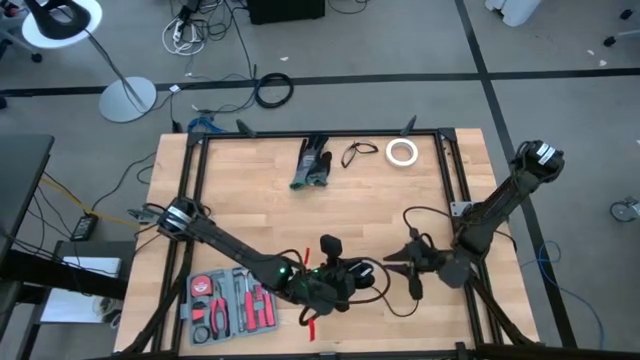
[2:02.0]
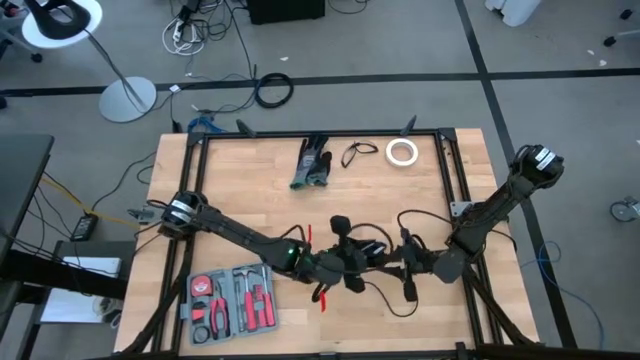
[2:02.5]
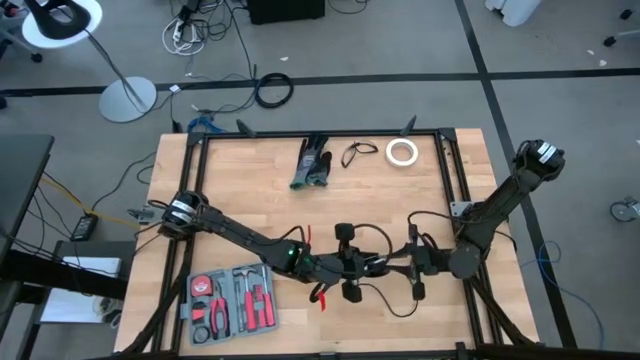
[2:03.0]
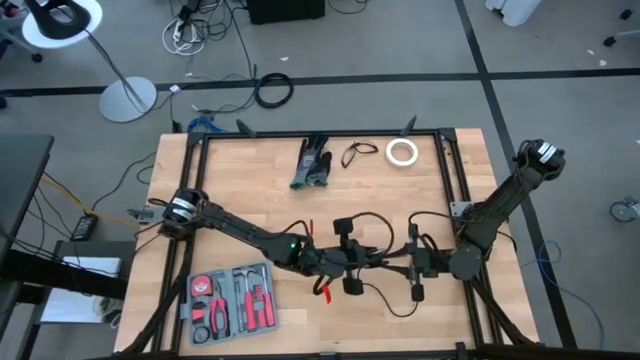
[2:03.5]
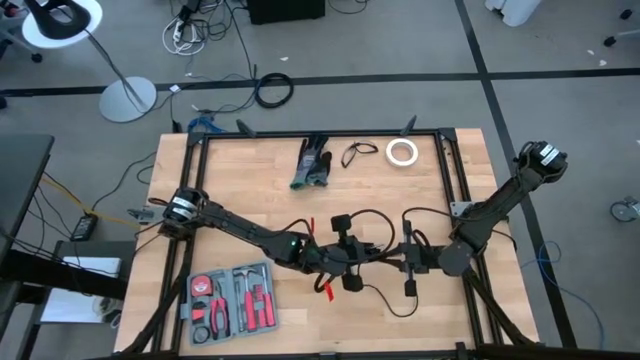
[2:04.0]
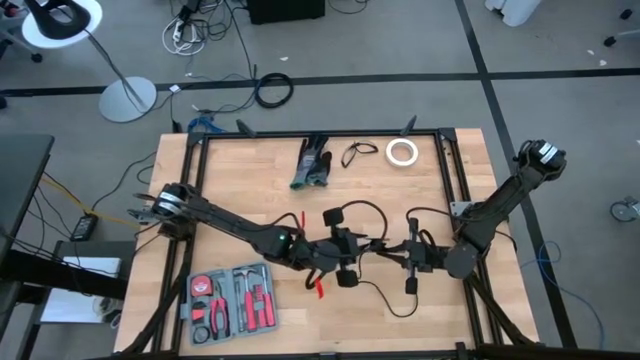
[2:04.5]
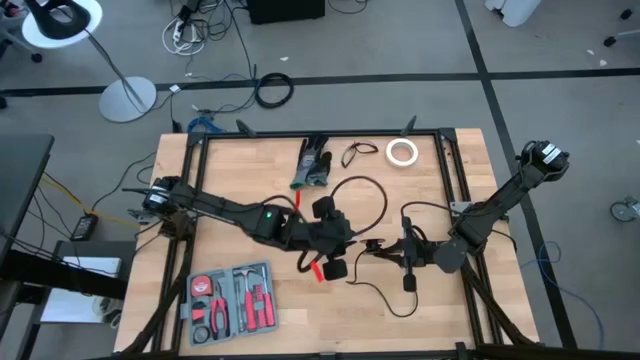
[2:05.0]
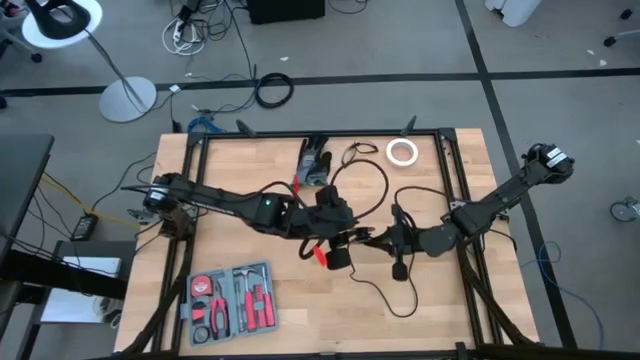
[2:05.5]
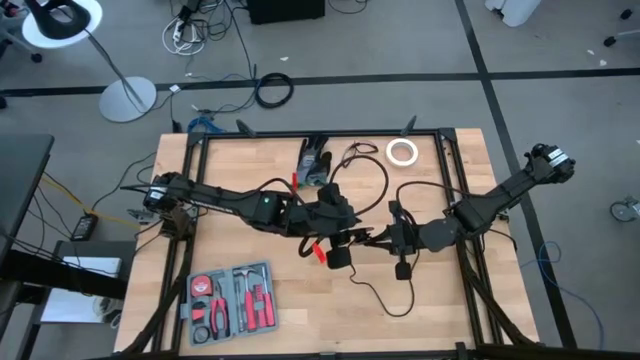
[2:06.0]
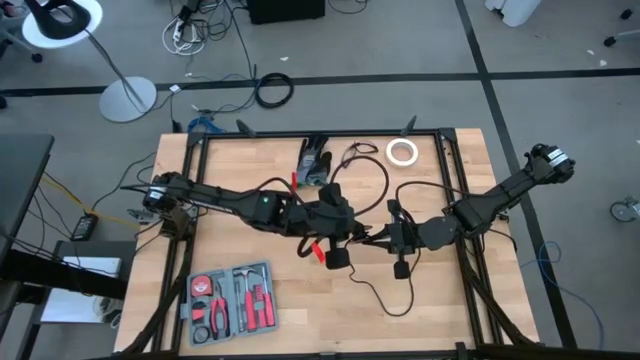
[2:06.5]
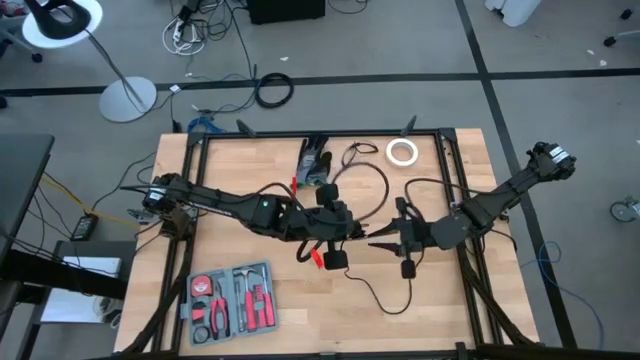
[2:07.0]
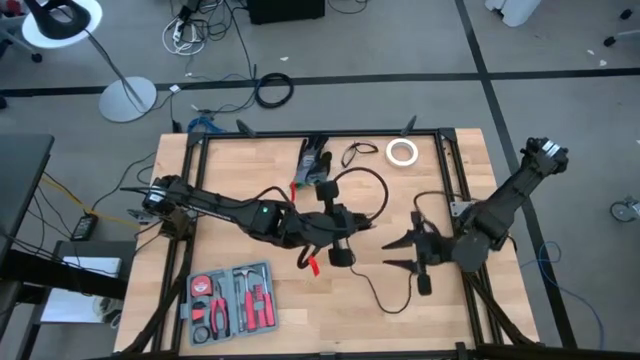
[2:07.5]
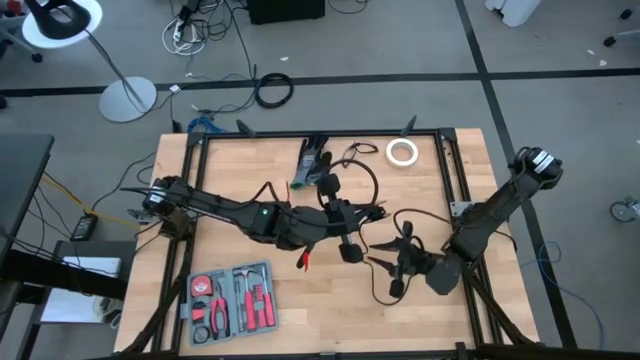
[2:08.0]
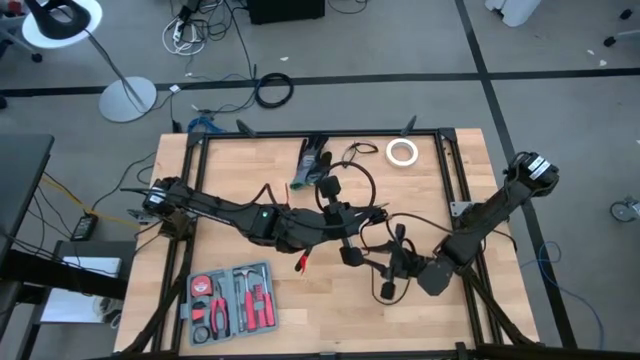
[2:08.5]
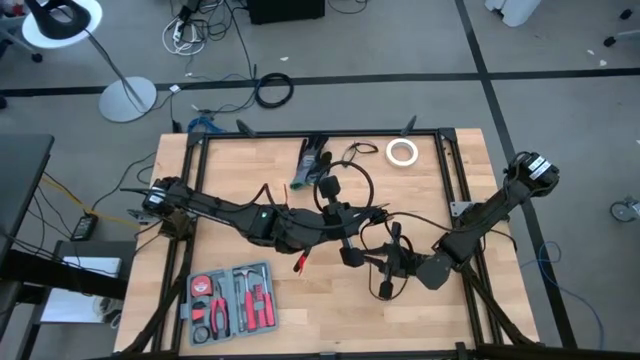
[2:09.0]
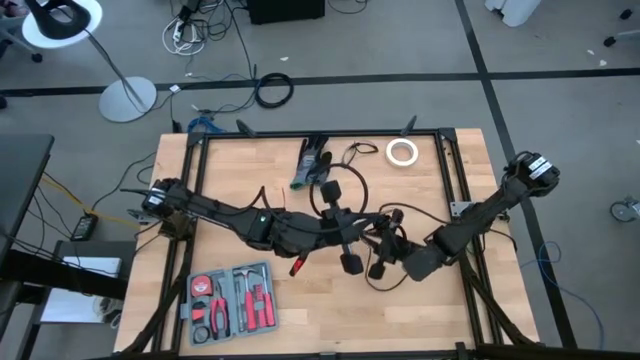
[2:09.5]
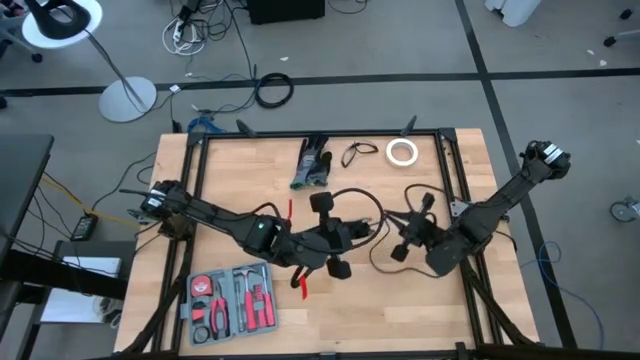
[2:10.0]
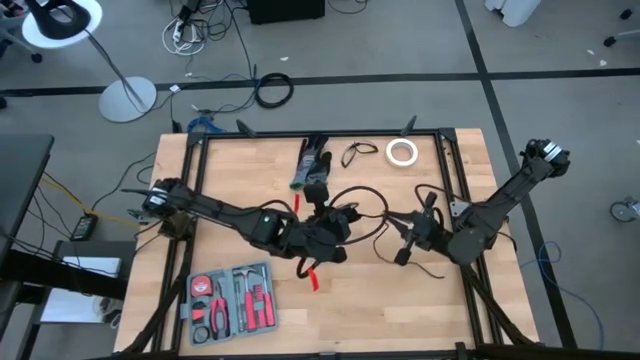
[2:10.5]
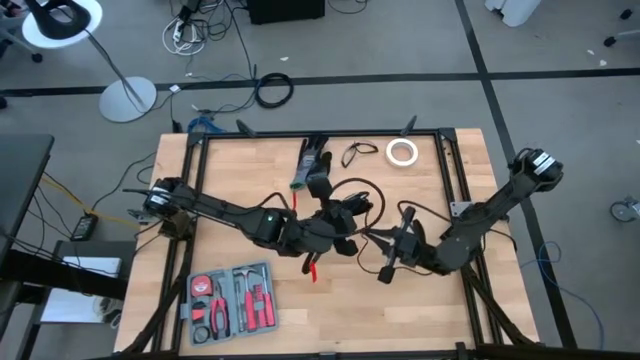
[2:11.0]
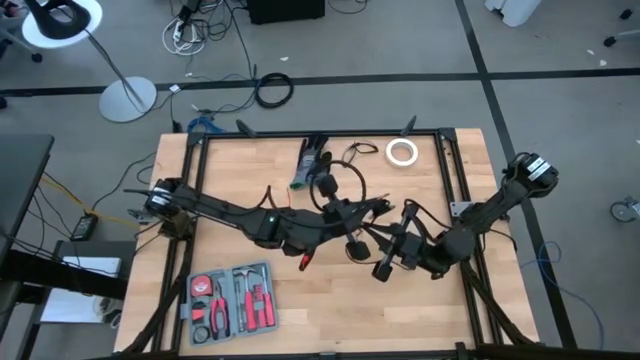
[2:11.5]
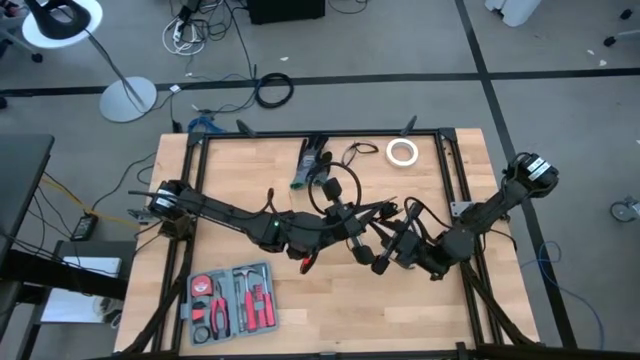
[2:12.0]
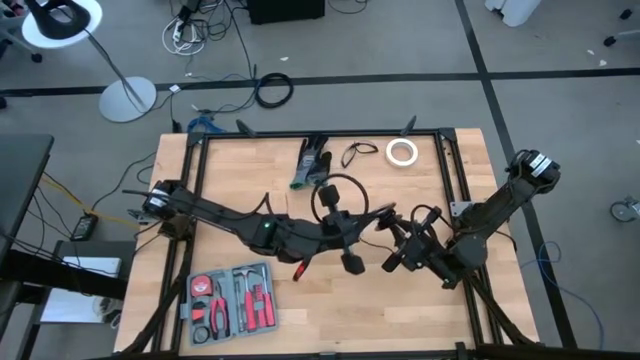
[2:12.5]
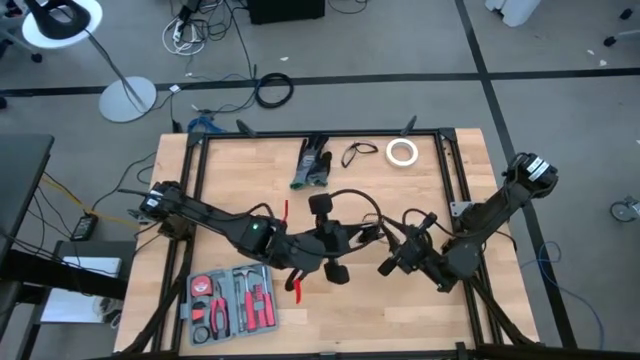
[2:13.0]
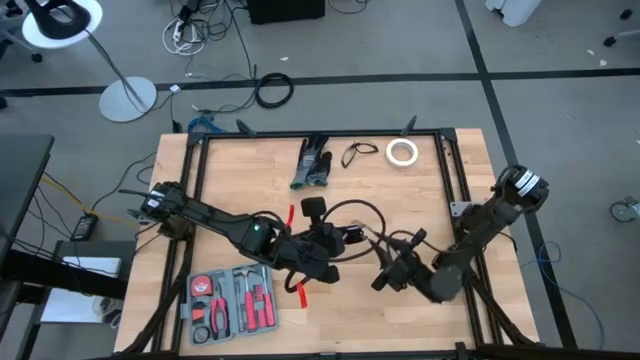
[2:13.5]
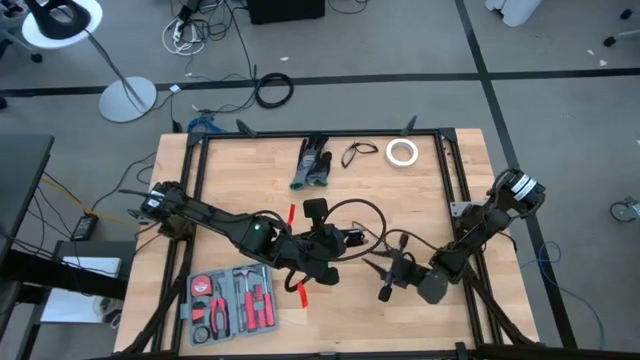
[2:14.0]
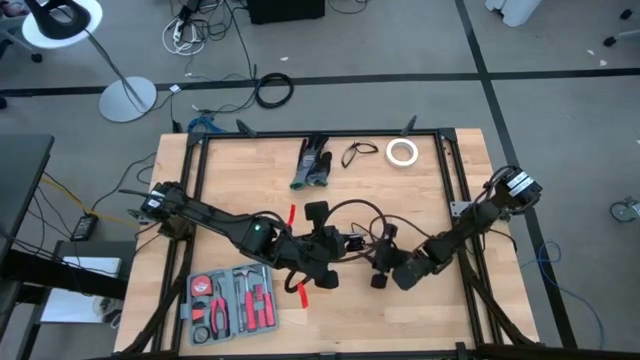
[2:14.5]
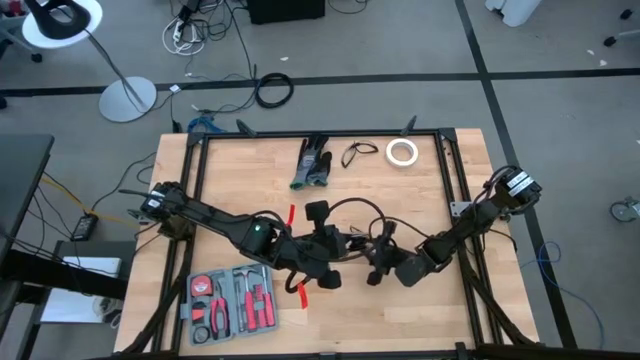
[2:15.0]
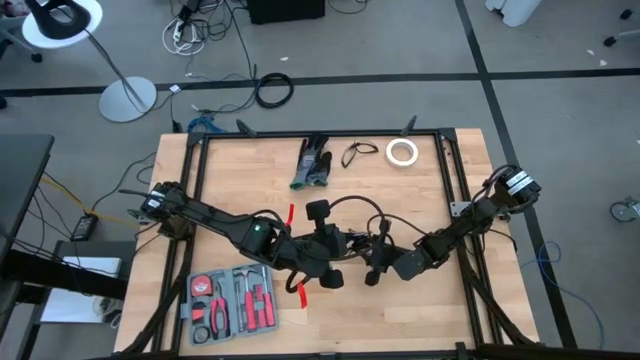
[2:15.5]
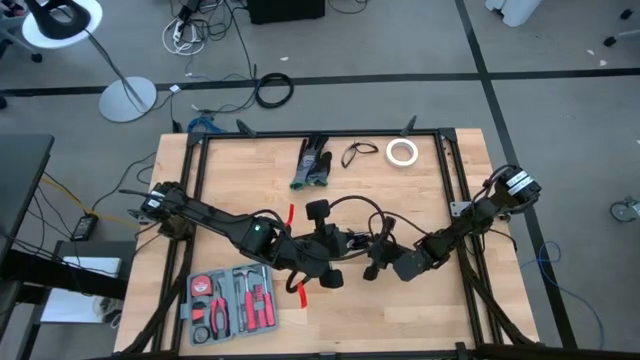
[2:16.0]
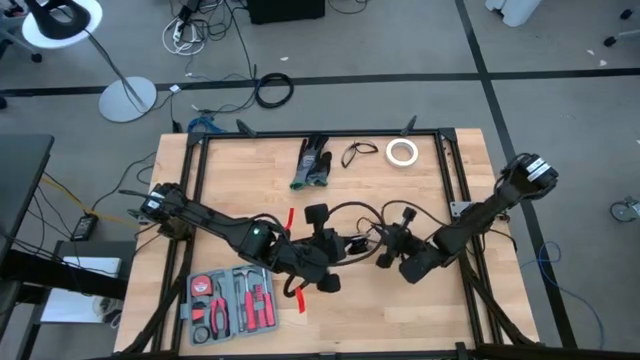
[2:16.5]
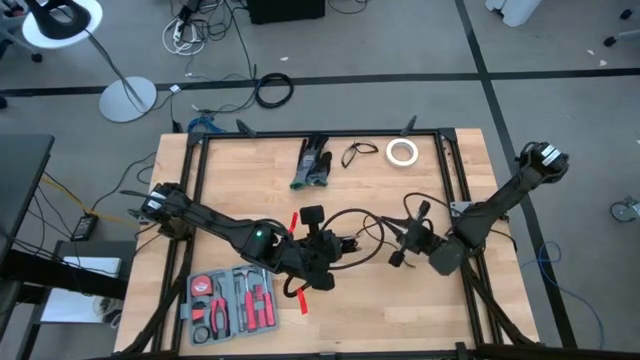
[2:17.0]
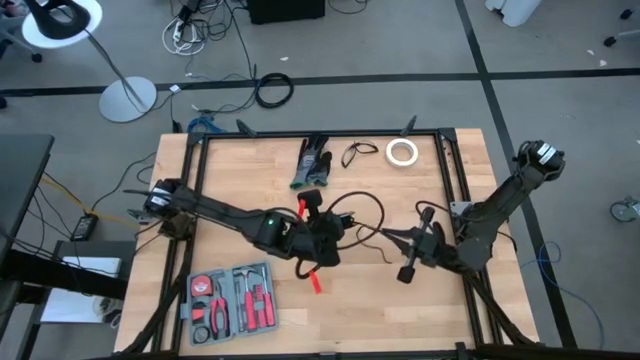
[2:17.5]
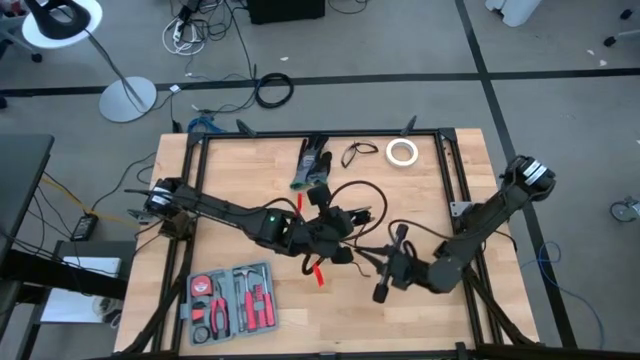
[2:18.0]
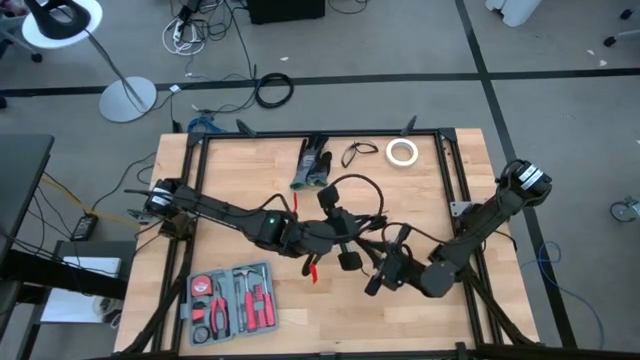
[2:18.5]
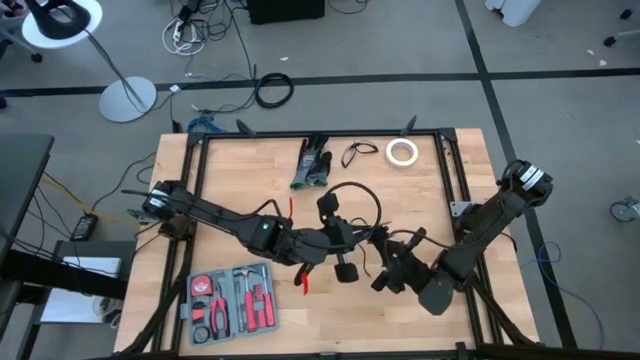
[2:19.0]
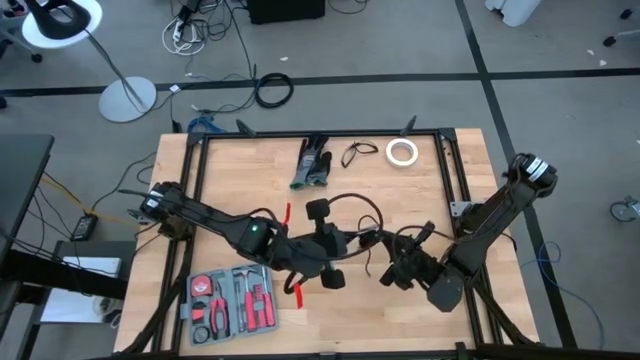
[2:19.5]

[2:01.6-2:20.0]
Task: Coil cords
Coil the black wire into a spool

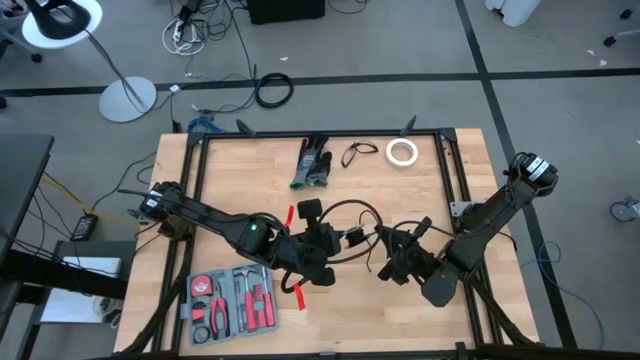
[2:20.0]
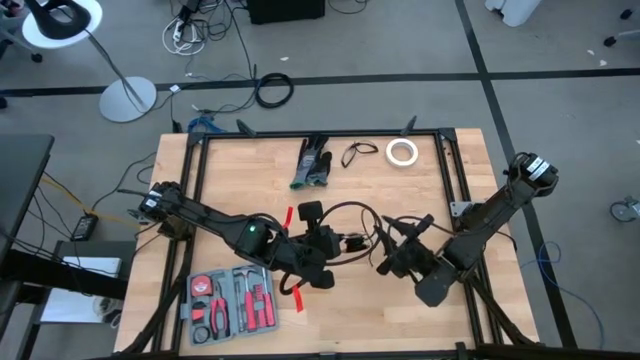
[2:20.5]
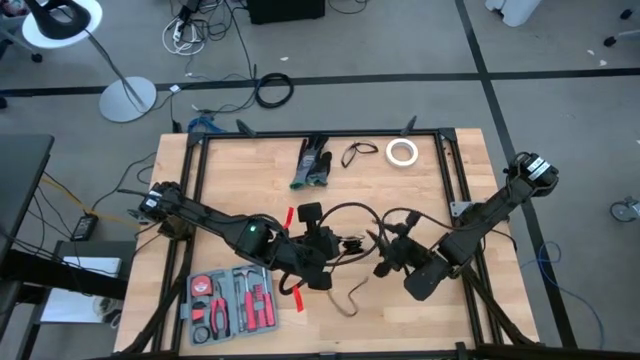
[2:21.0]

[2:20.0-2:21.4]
Coil the black wire into a spool

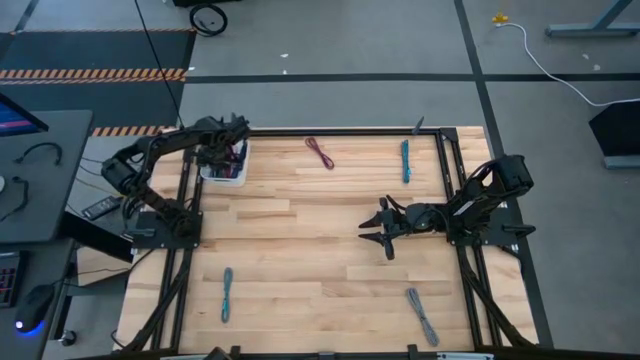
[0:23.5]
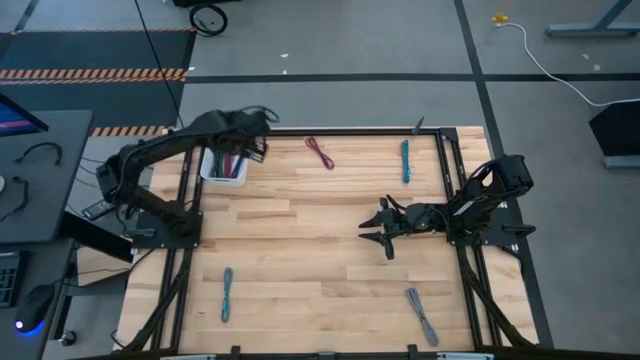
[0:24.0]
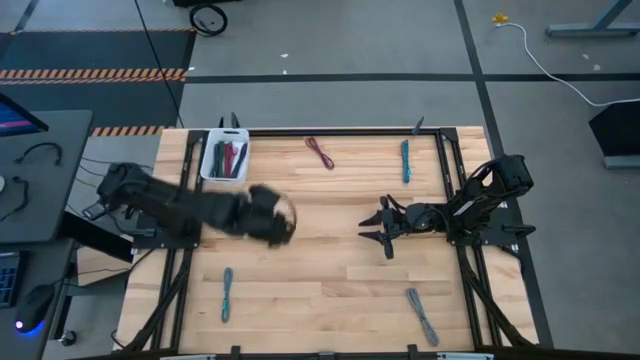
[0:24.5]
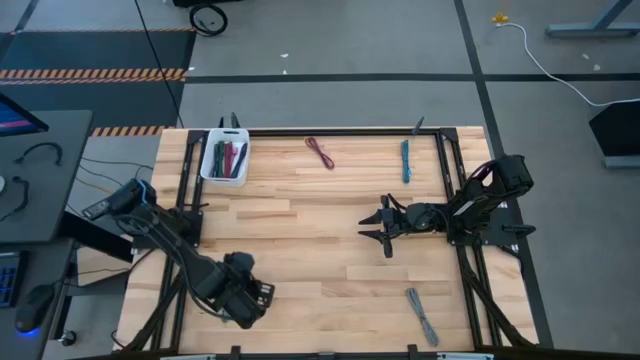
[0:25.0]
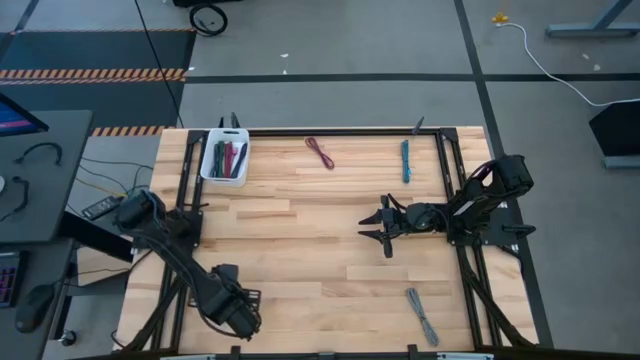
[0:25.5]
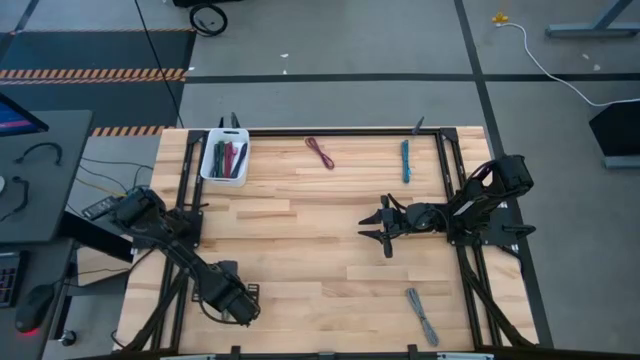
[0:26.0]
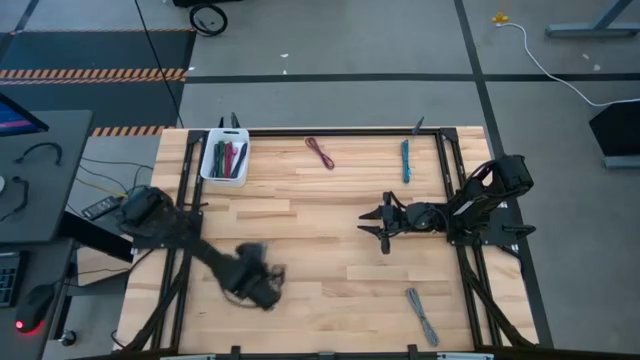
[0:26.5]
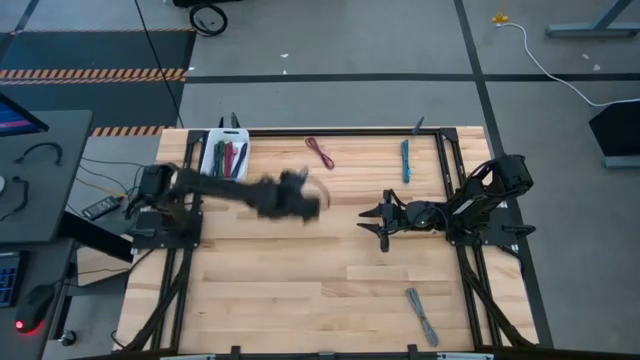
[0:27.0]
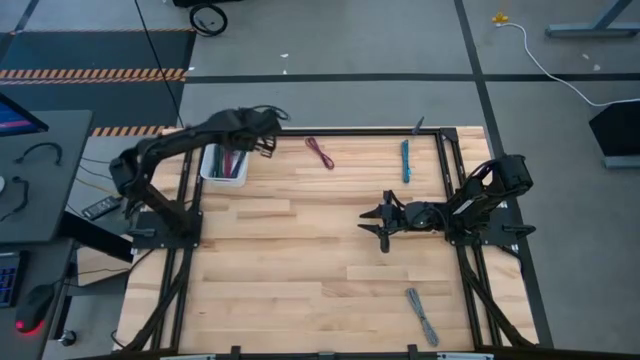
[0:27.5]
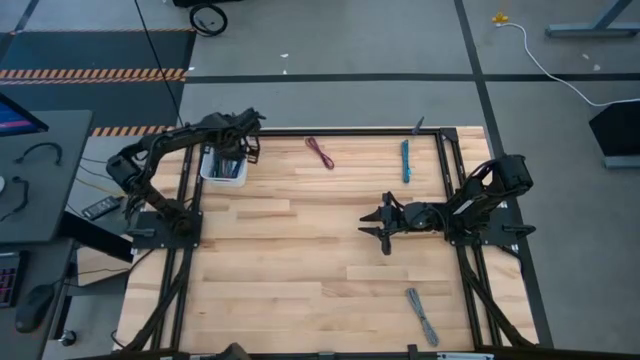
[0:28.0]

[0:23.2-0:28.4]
Task: Pick and place USB-C Cables
Put the bottom blue charger cable into the white bin
